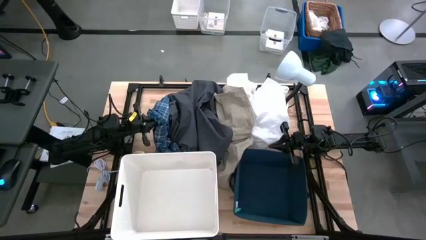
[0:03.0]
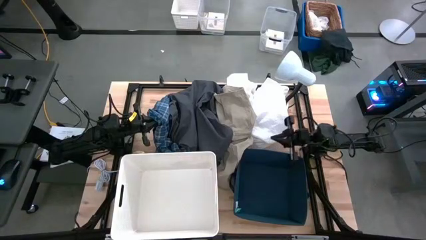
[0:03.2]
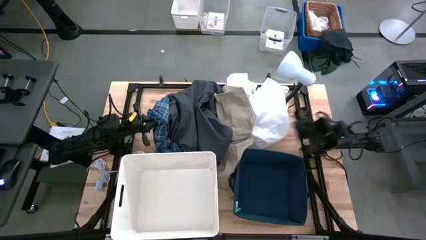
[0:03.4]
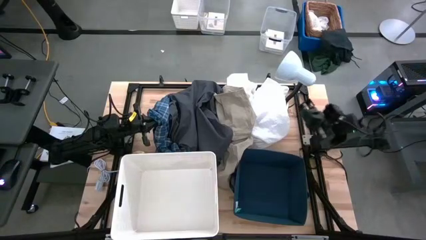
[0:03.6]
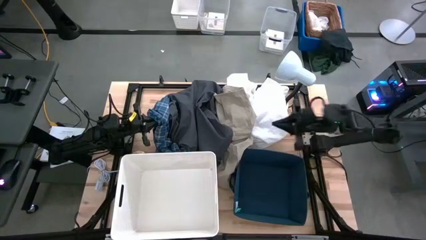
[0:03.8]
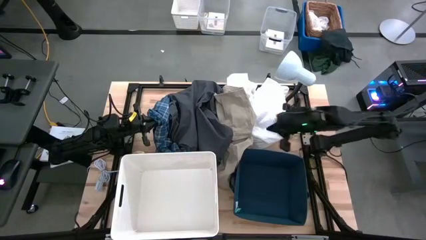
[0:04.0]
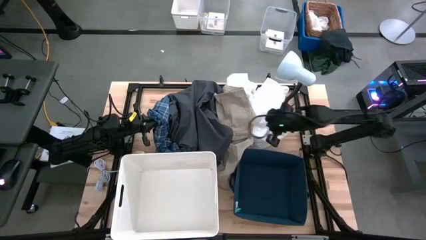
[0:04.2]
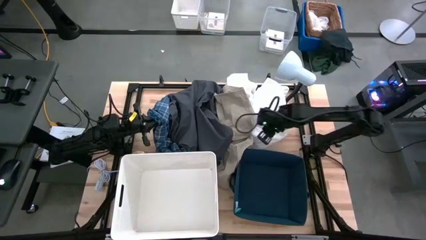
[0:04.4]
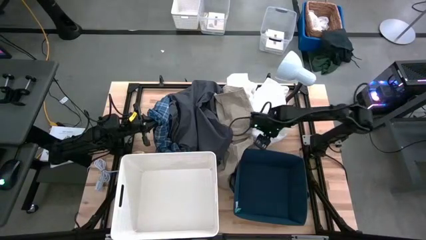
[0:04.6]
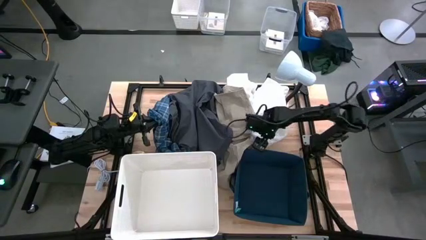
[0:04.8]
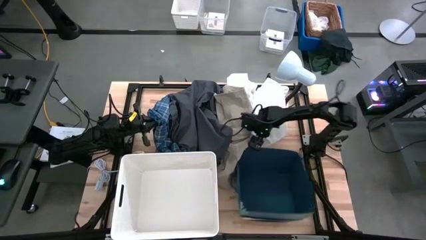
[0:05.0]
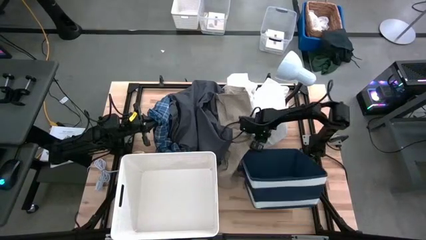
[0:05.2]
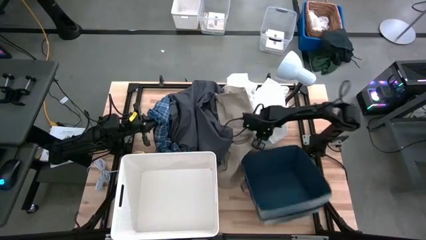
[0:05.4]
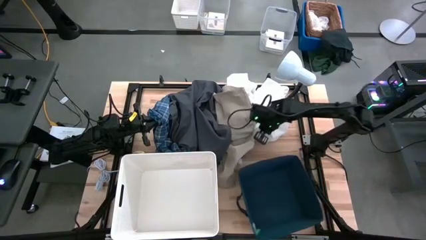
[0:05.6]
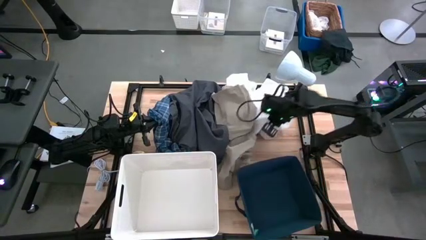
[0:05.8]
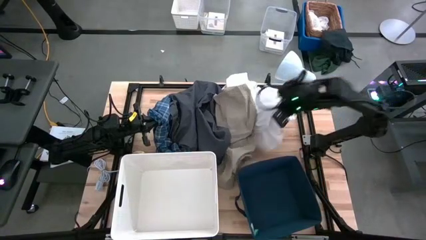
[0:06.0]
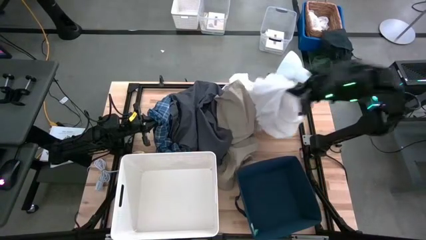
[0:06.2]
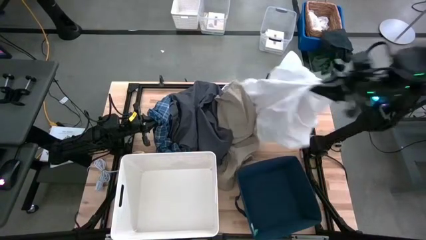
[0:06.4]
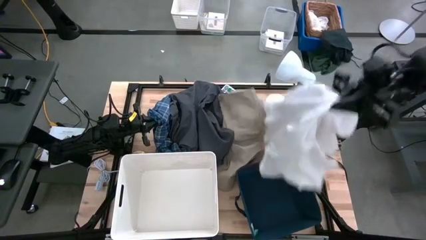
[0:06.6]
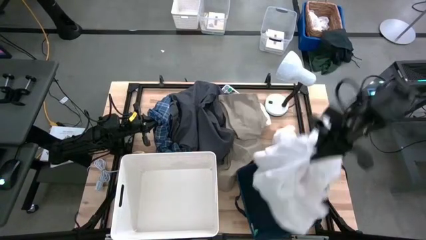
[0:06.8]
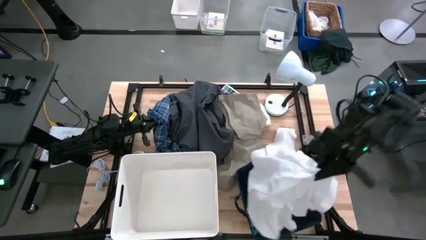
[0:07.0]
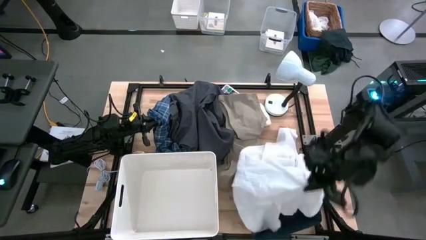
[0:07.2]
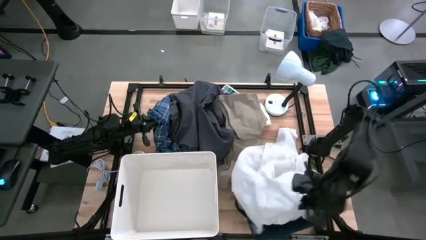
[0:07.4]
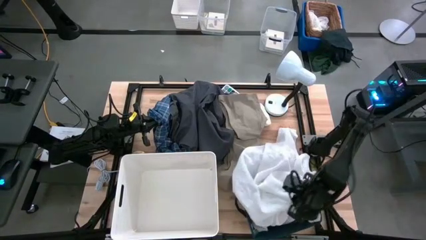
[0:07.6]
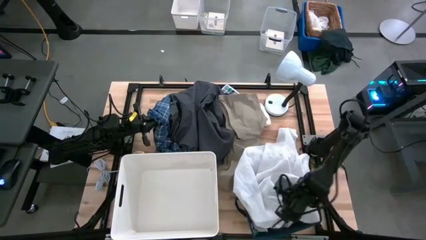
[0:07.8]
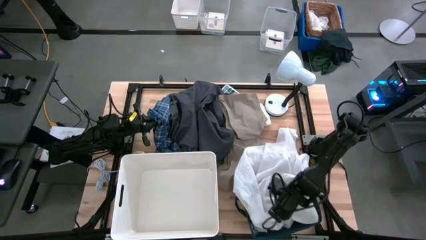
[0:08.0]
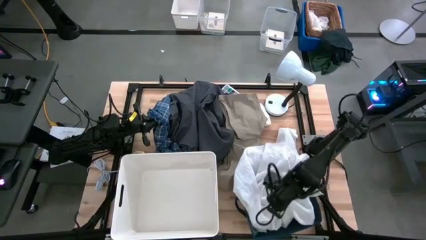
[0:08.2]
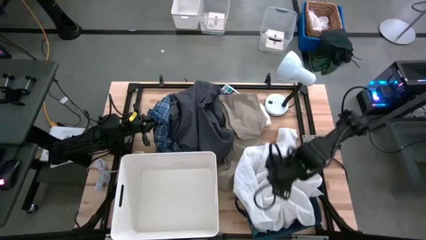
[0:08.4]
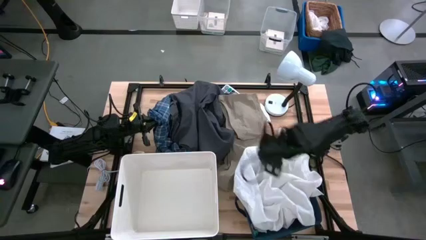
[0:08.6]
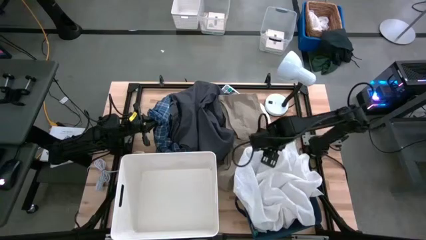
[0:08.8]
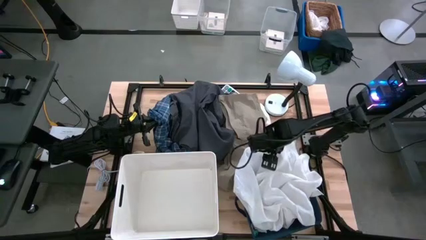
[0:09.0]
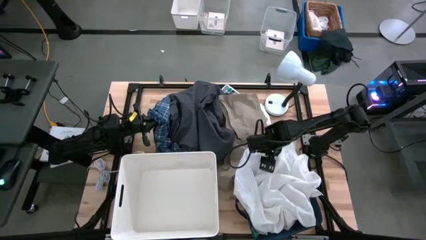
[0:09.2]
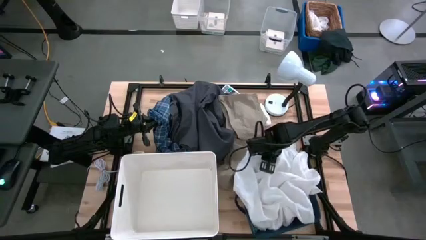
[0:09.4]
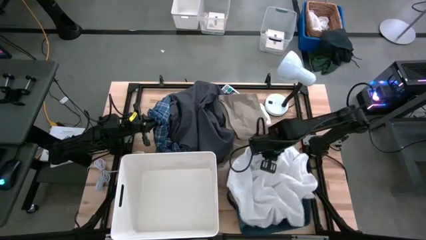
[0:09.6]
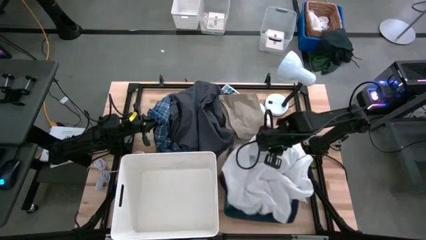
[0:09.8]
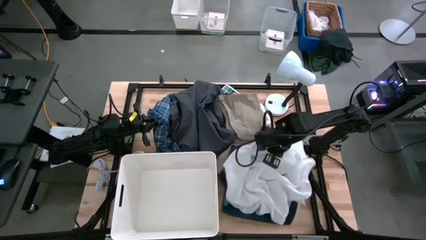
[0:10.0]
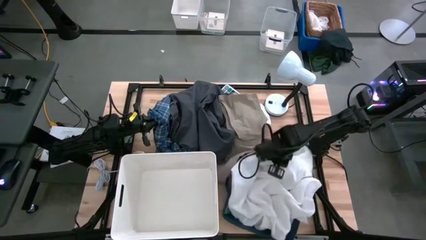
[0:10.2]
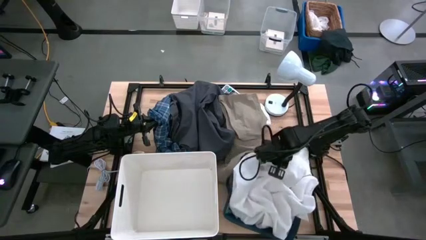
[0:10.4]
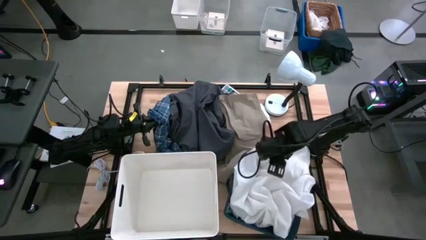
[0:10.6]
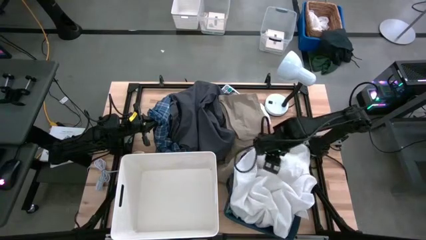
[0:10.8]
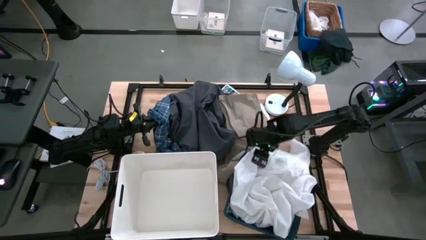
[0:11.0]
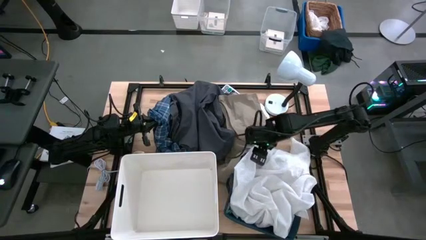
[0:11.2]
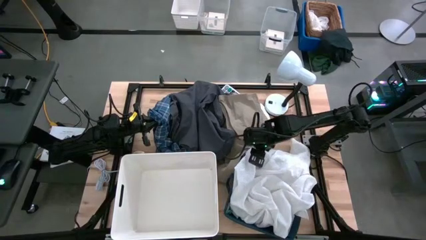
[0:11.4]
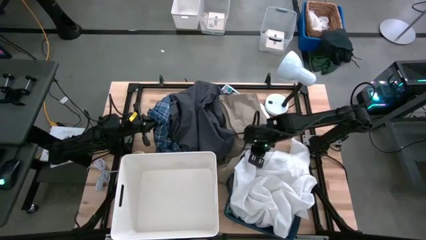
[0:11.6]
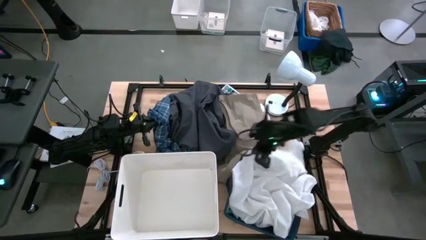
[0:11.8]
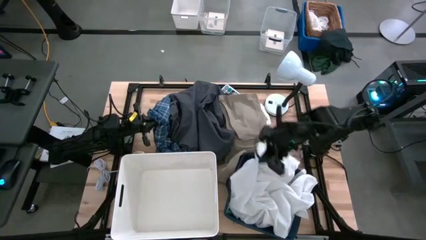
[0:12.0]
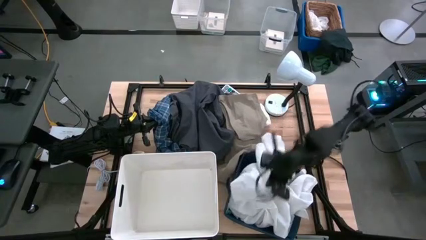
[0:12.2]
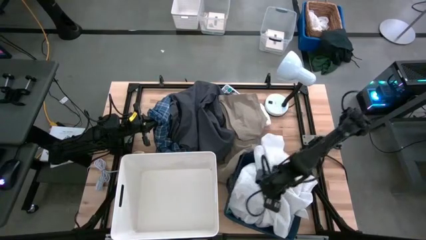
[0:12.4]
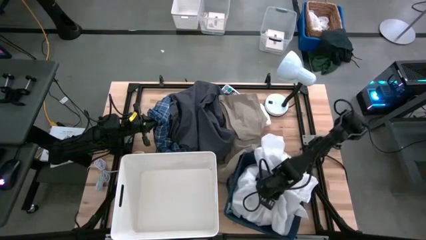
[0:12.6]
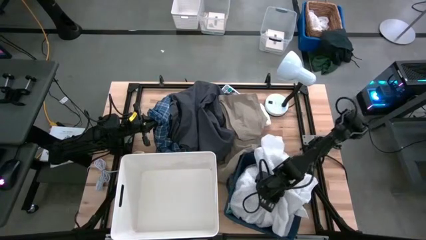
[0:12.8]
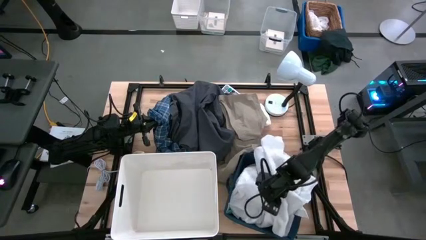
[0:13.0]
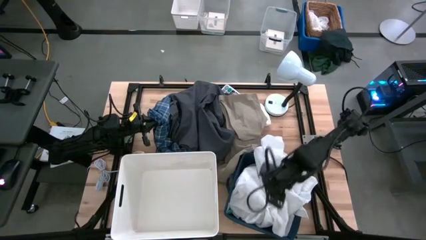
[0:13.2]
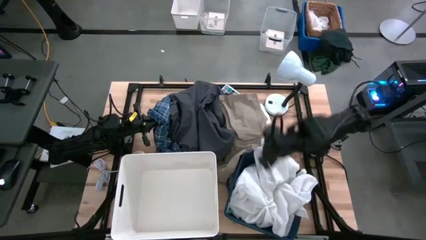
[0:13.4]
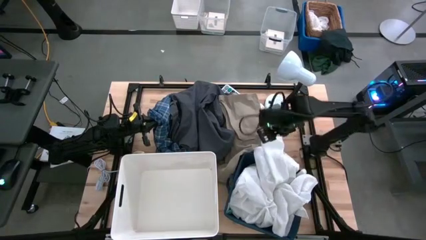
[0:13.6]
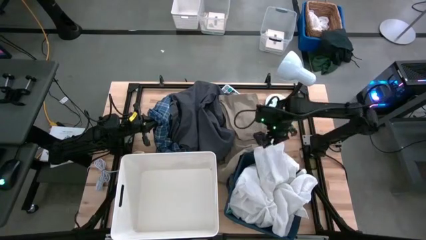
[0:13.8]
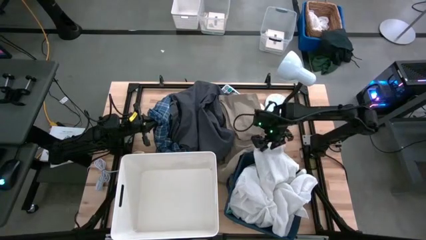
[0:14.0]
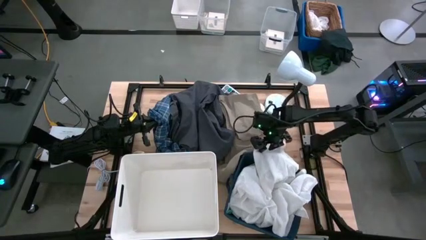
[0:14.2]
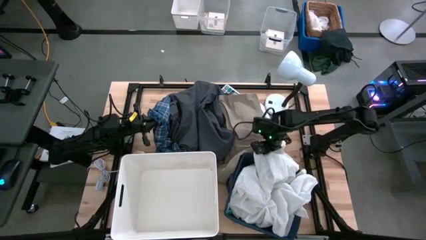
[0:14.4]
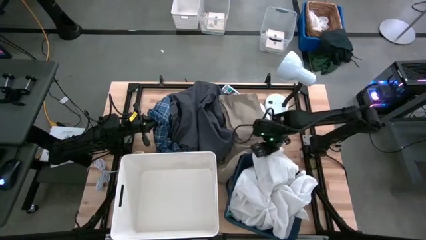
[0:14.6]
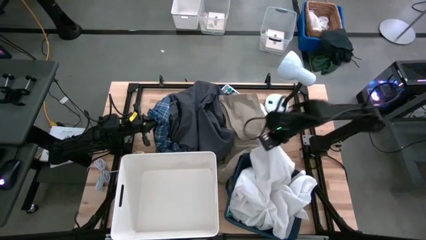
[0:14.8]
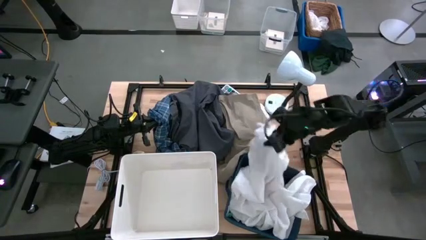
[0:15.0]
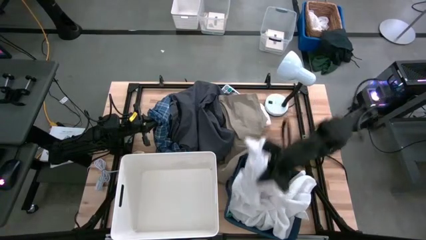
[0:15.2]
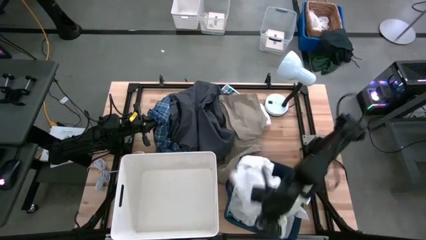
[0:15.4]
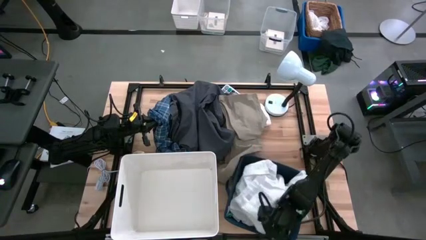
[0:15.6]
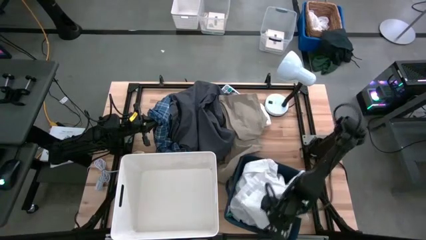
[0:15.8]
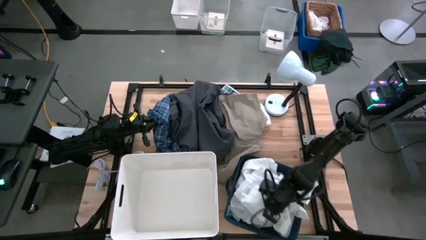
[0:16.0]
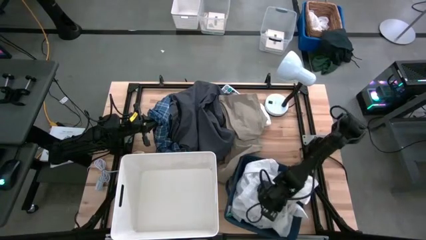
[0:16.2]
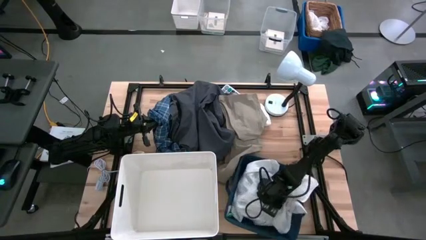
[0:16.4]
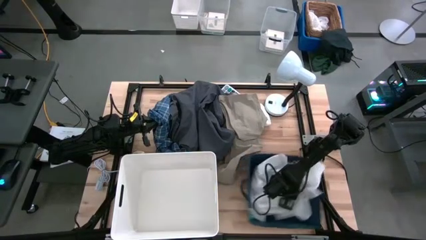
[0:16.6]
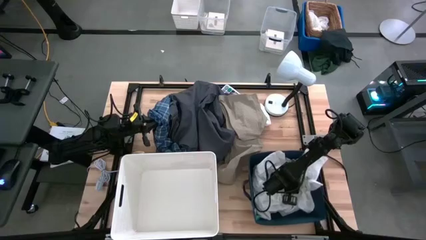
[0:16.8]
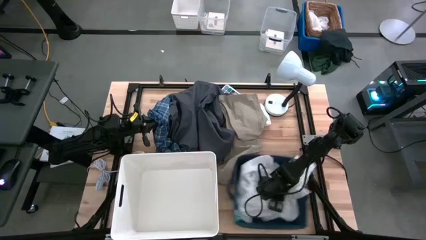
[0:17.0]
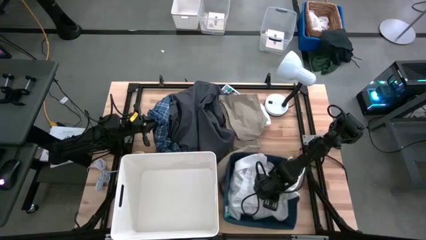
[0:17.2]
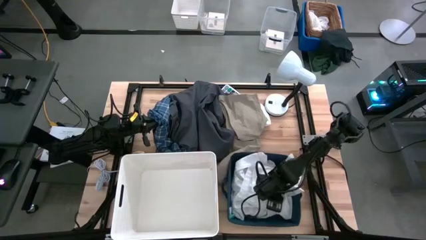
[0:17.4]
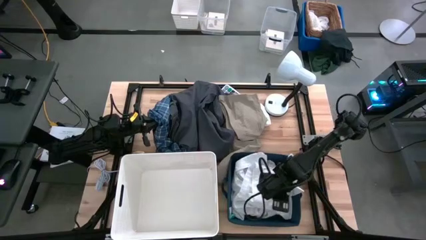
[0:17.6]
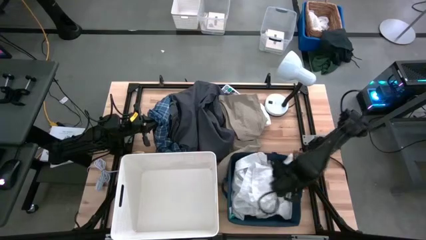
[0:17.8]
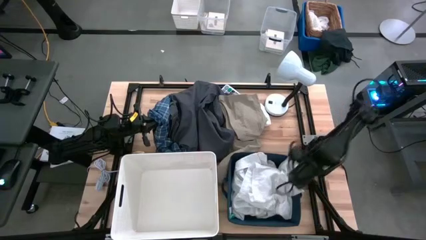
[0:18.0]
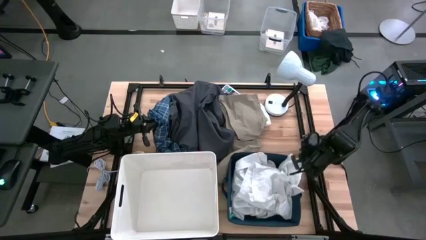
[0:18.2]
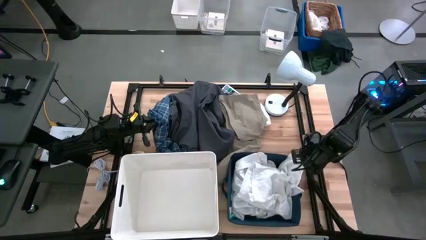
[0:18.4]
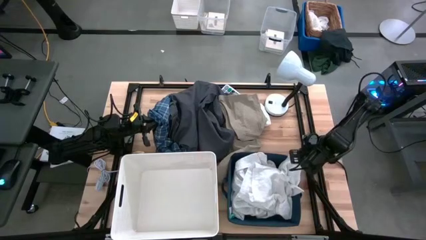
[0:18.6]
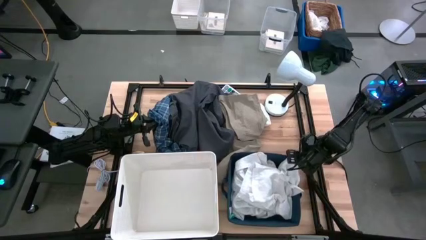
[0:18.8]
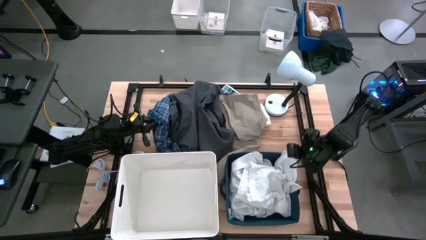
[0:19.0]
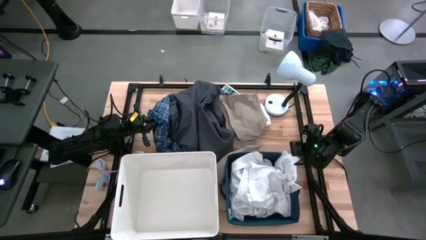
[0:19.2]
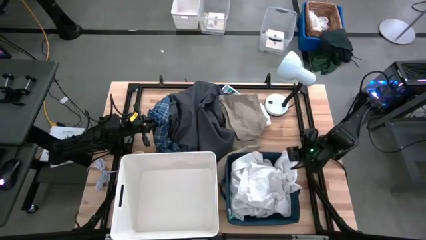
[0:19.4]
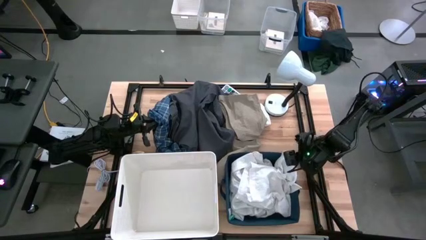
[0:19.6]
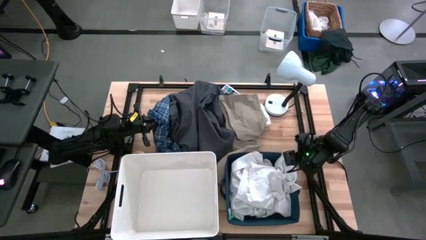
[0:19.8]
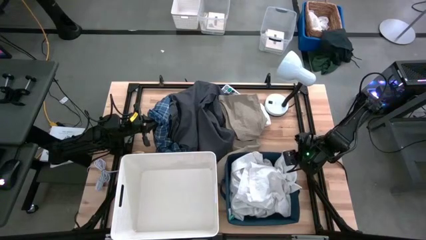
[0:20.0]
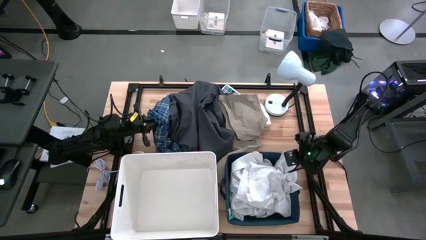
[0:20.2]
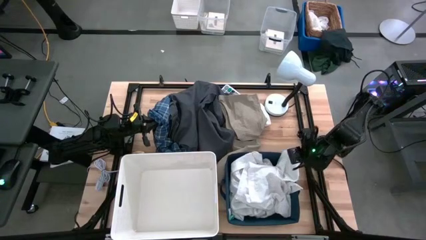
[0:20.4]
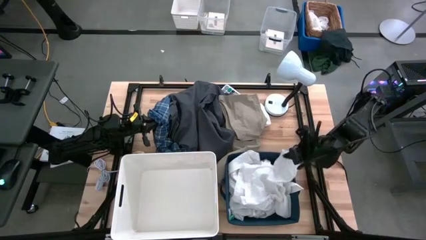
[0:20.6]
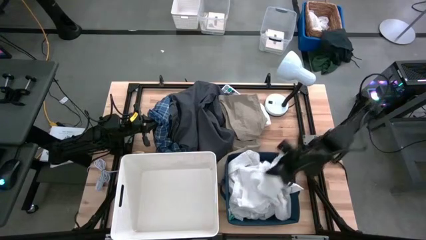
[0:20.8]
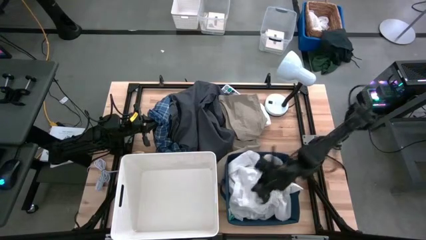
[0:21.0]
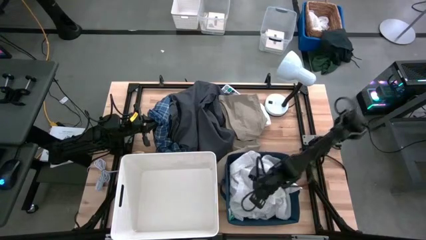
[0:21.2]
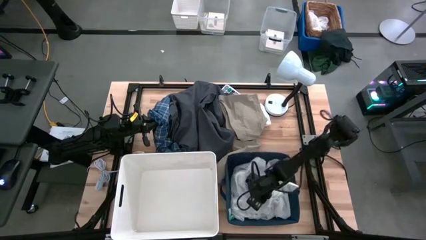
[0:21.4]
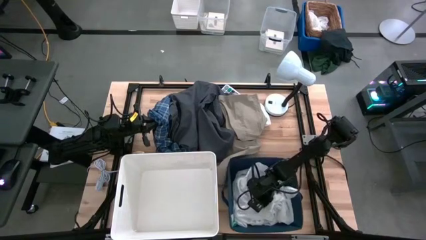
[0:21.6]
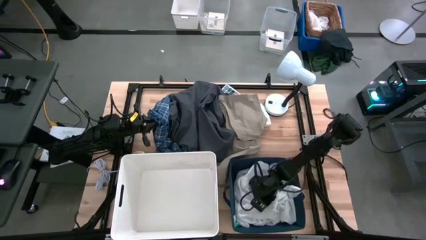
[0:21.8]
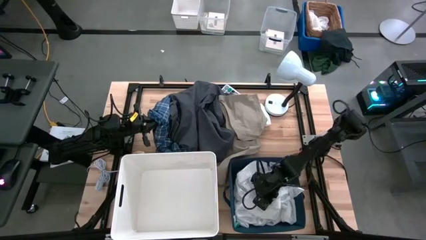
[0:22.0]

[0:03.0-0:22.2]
Task: Sort clothes
Put the white shirt into the blue laundry organizer
